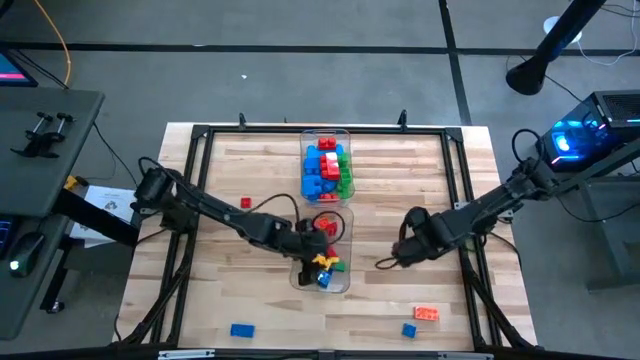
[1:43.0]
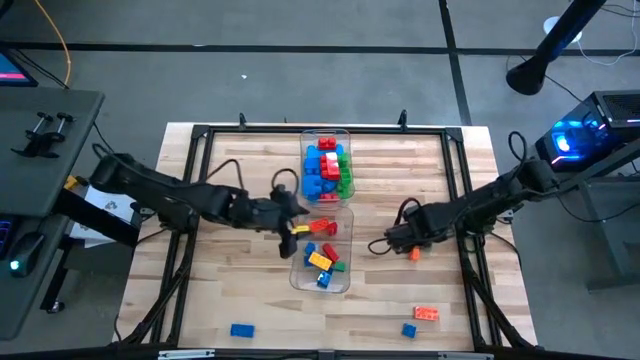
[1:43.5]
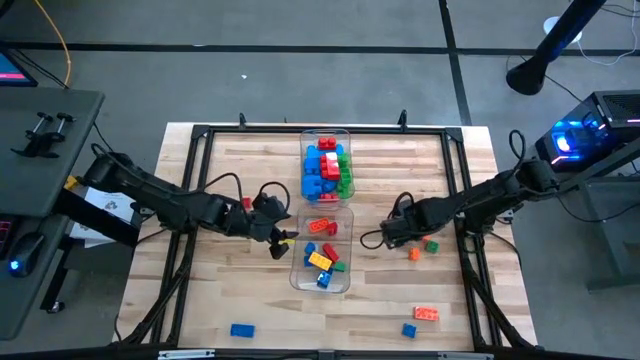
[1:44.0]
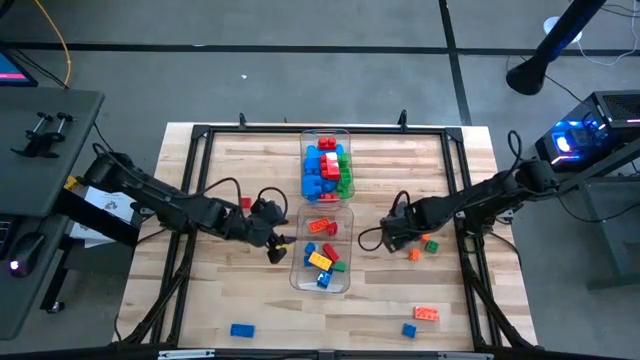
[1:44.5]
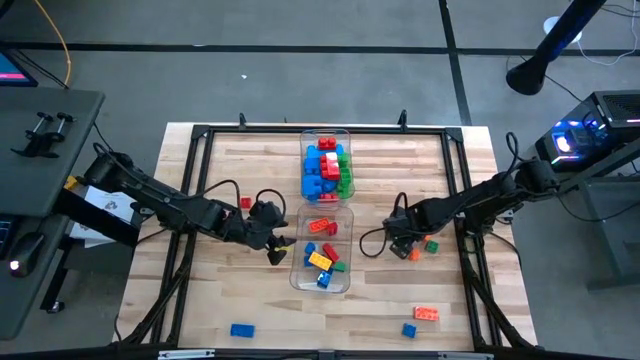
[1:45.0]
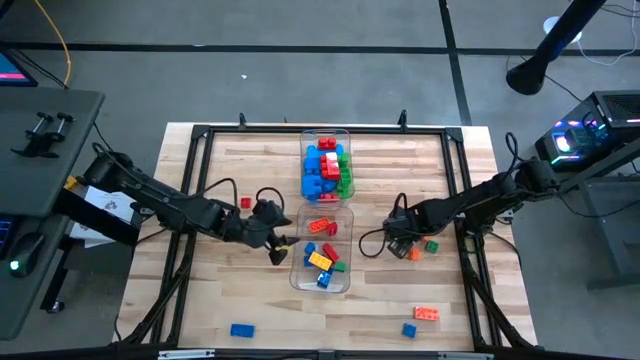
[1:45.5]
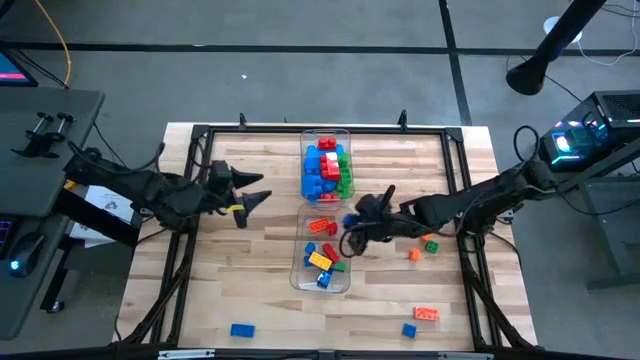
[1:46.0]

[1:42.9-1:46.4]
Task: Sort blocks by size
Put the small blue game piece into the bottom transparent bin

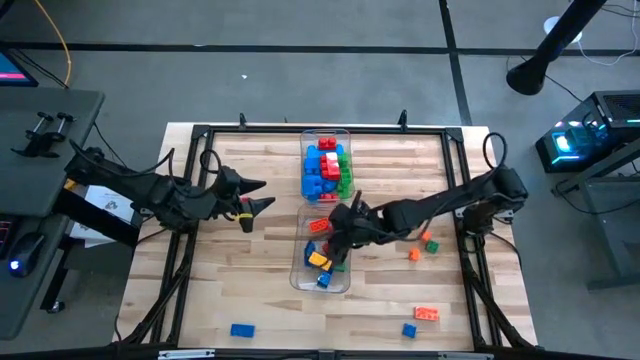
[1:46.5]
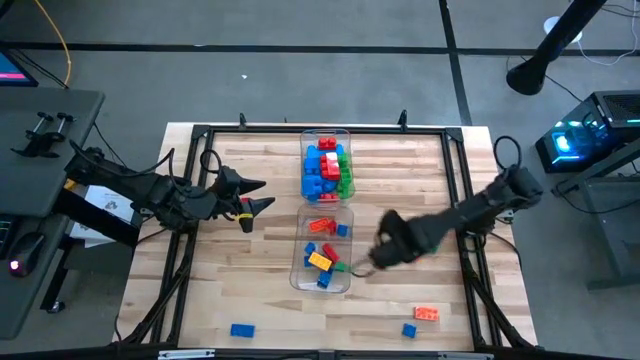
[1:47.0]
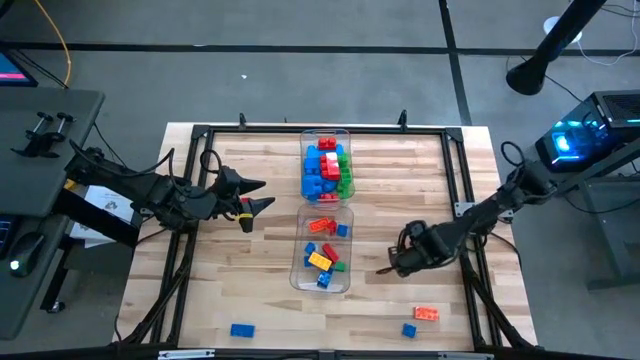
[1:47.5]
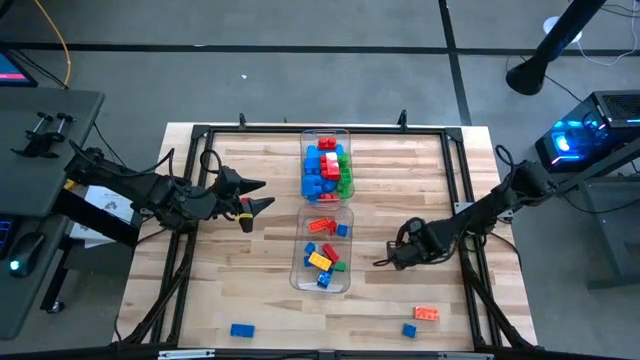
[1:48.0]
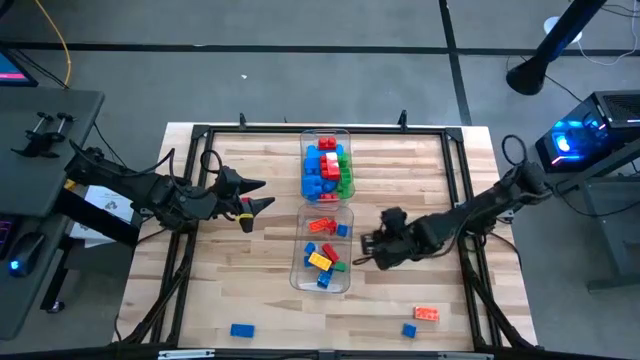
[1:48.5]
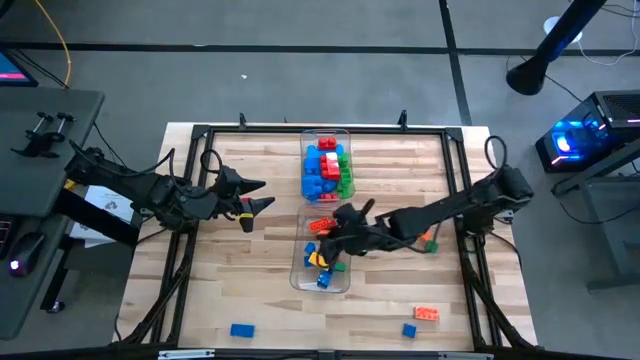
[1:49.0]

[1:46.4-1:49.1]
Put the small orange game piece into the bottom transparent bin

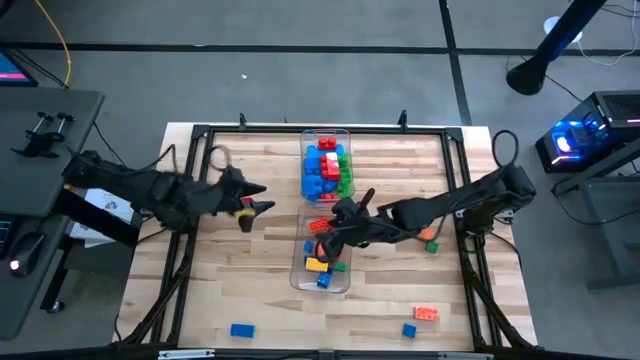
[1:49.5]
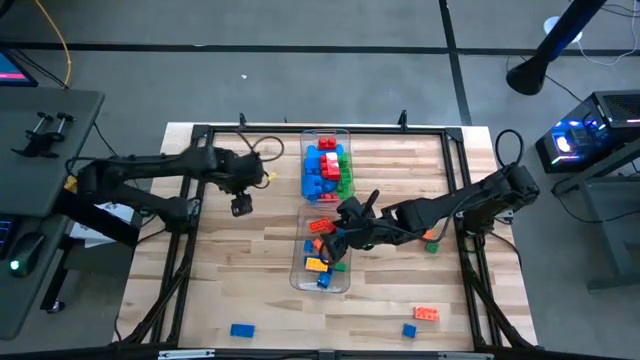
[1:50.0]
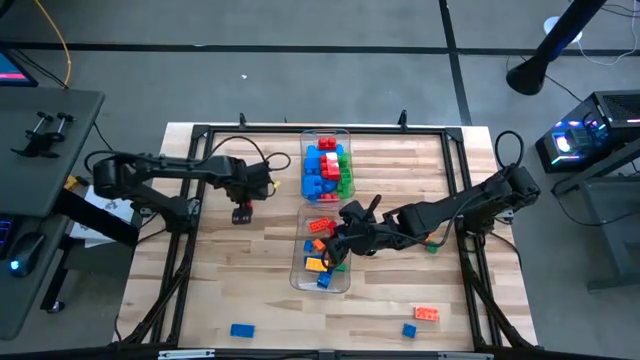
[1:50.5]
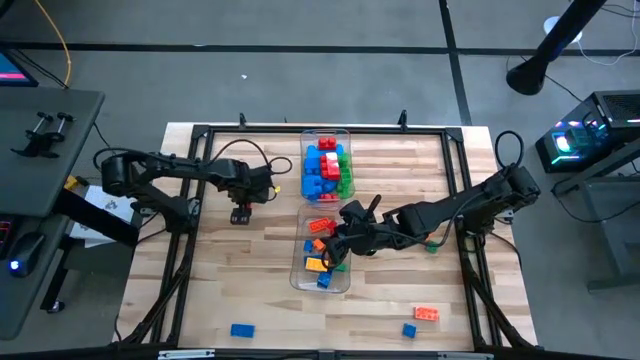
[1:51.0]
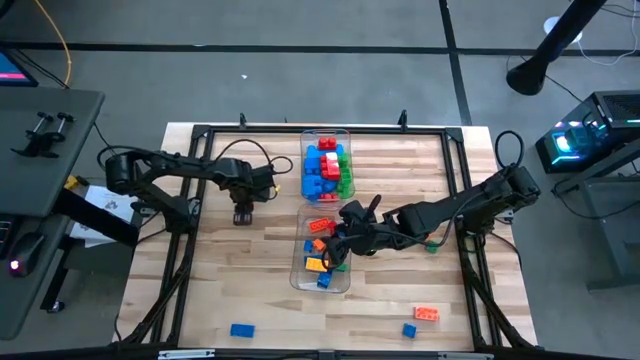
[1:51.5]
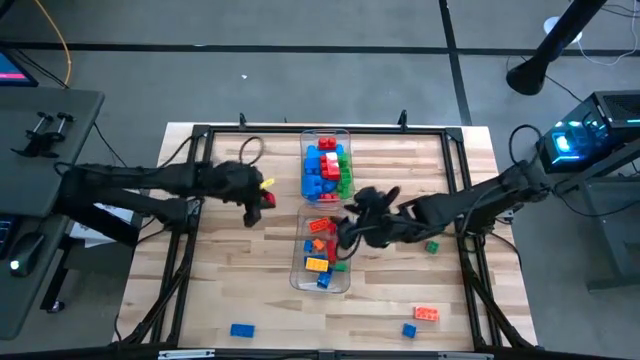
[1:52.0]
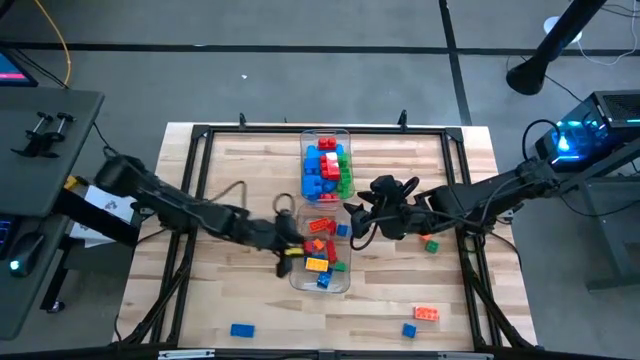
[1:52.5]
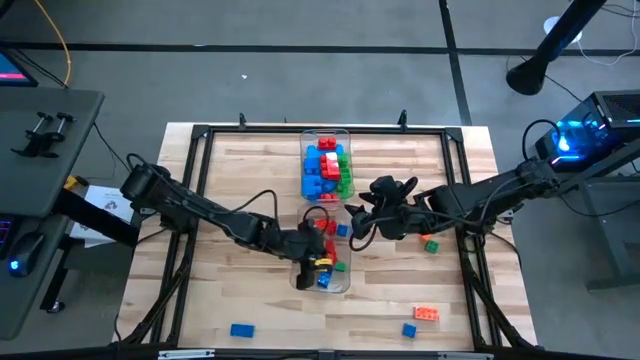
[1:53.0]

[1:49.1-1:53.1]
Put the small red game piece into the bottom transparent bin

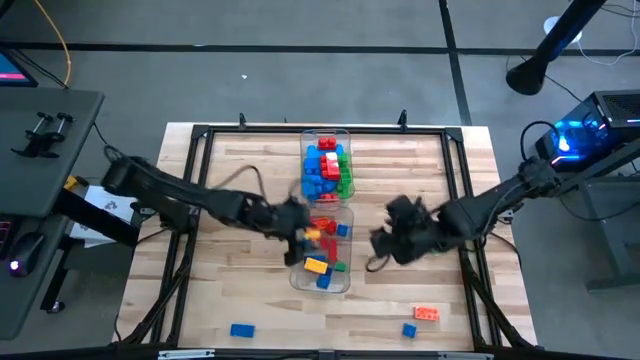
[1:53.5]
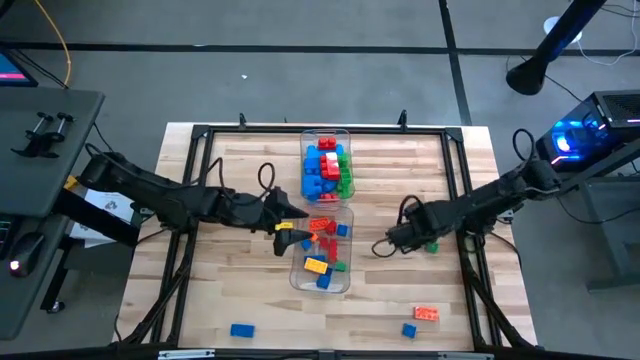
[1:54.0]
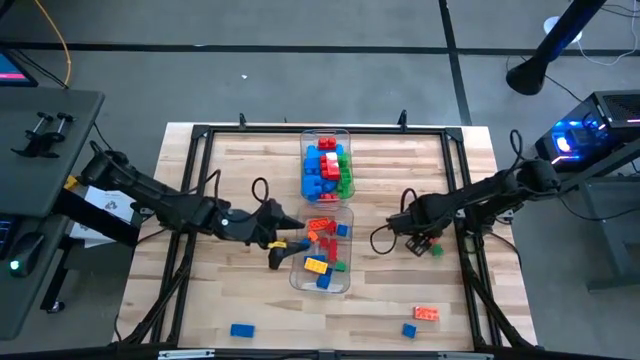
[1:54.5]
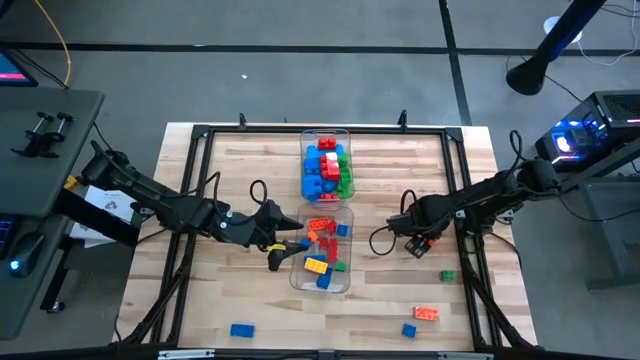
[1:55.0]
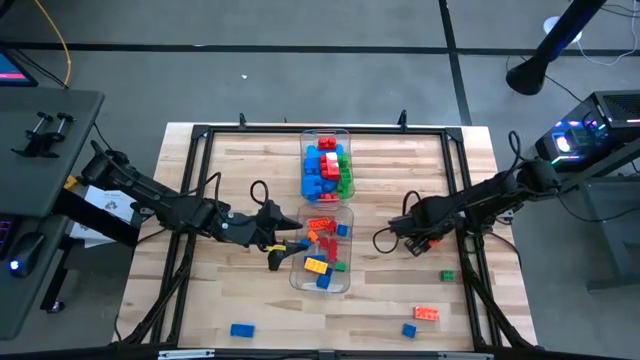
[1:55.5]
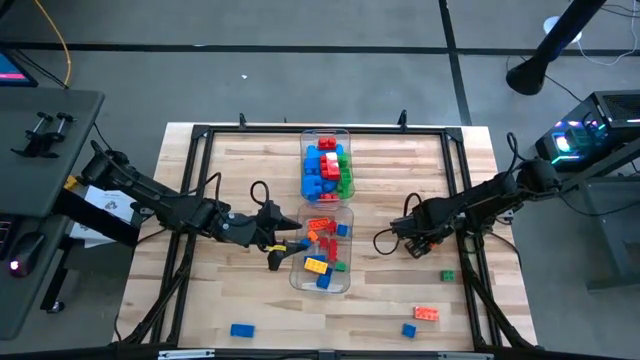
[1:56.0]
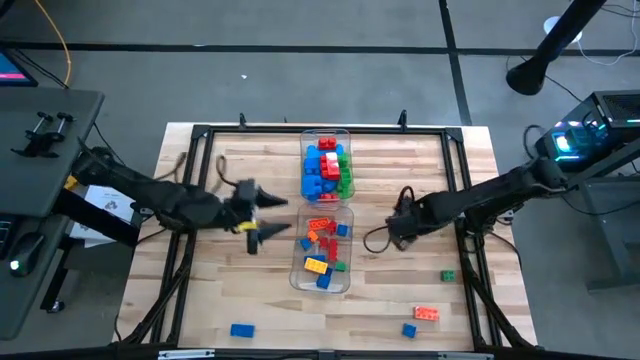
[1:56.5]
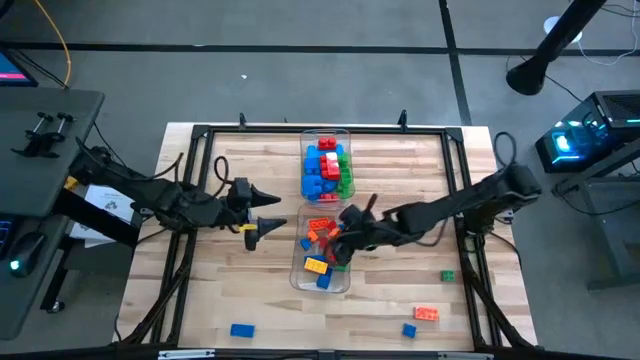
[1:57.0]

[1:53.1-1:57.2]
Put the small orange game piece into the bottom transparent bin

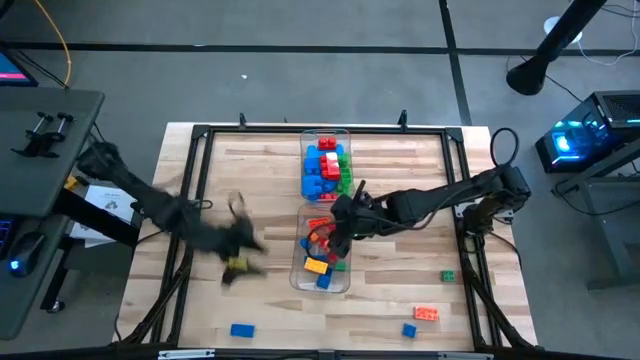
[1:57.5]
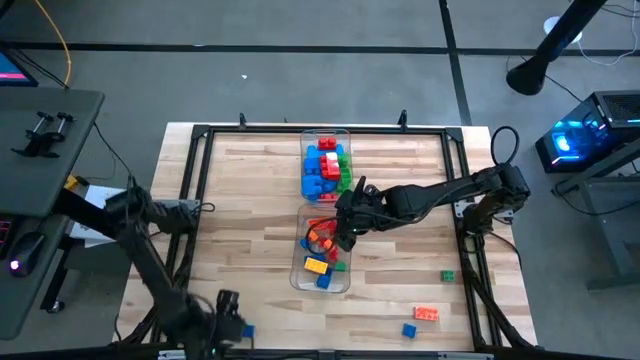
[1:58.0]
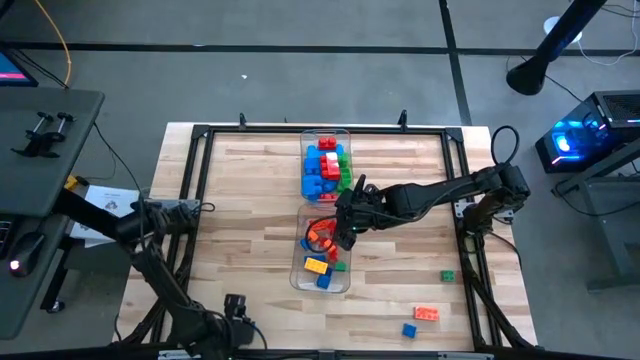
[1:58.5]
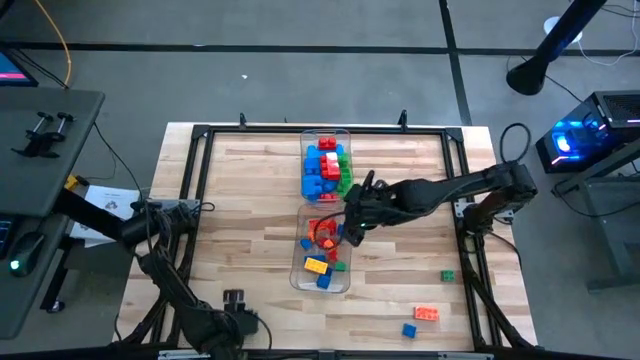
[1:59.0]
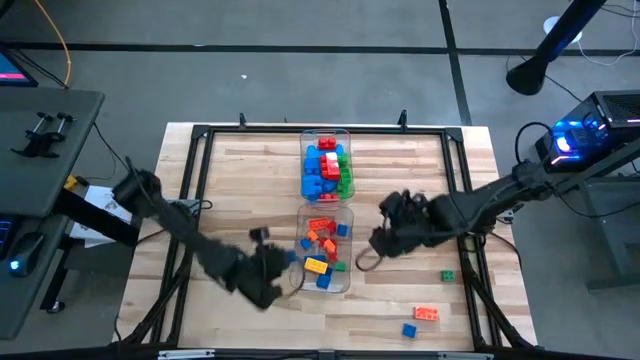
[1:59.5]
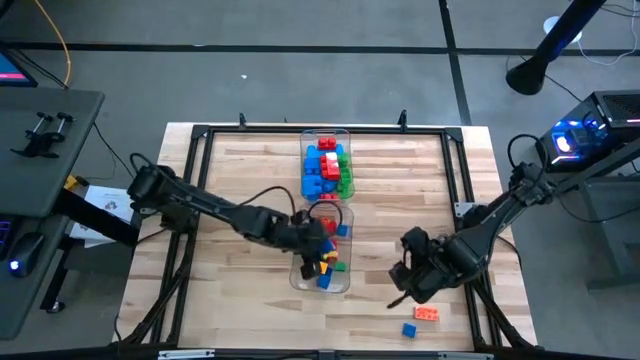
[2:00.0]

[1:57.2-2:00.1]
Put the small blue game piece into the bottom transparent bin

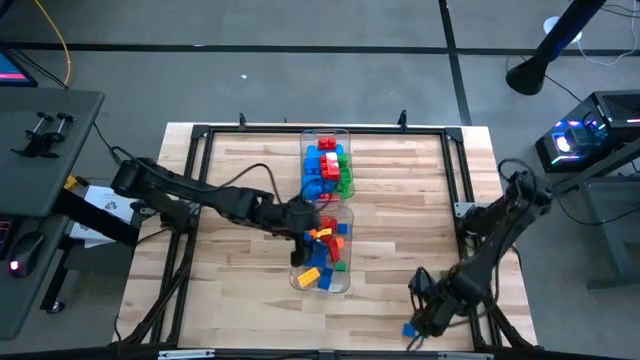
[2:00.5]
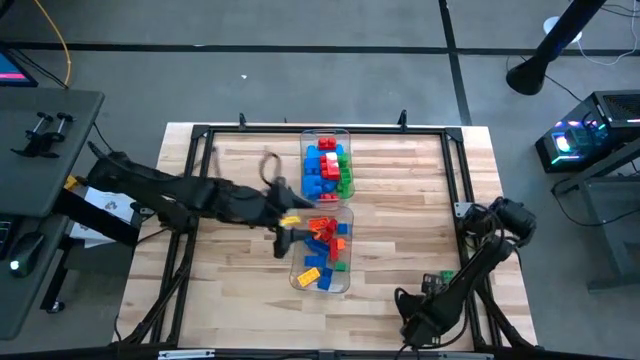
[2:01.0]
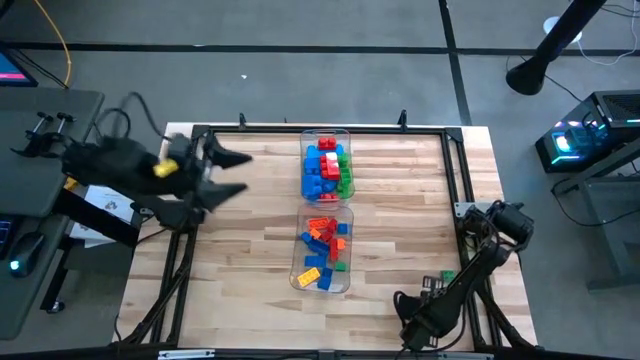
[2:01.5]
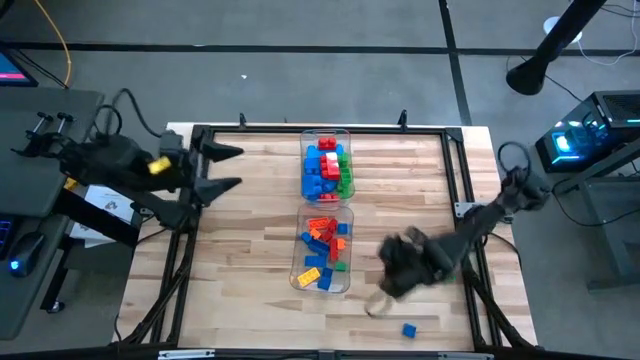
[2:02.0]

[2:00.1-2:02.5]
Put the small orange game piece into the bottom transparent bin

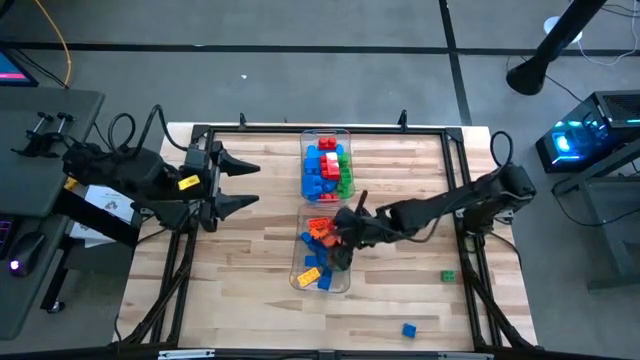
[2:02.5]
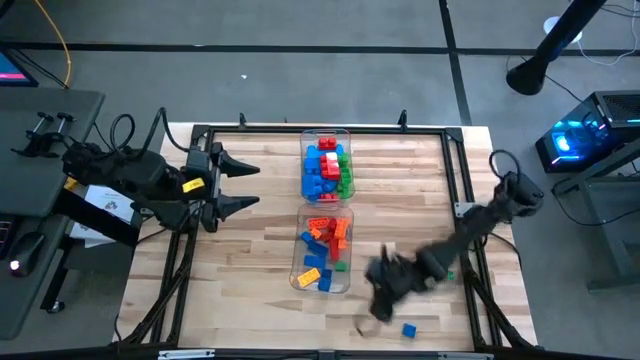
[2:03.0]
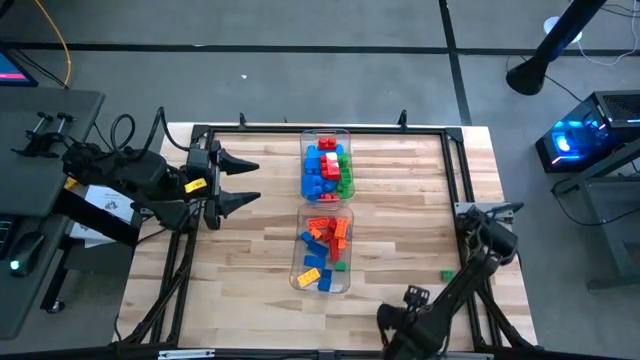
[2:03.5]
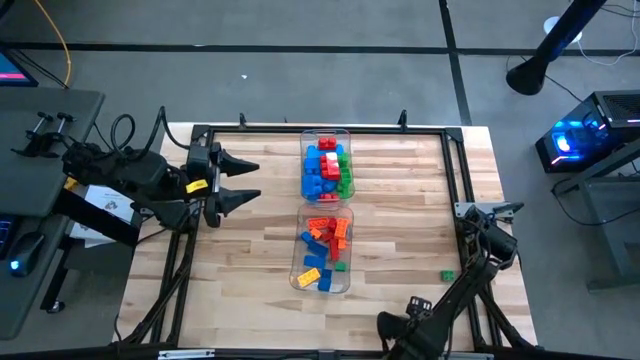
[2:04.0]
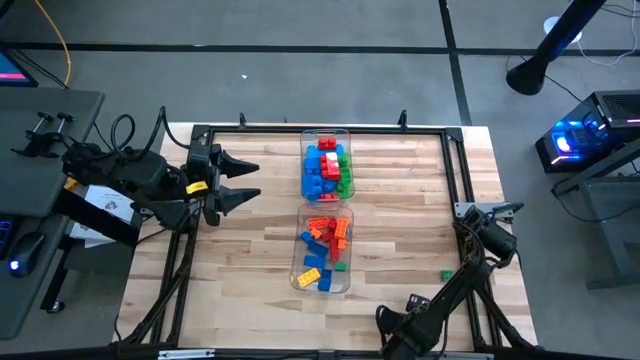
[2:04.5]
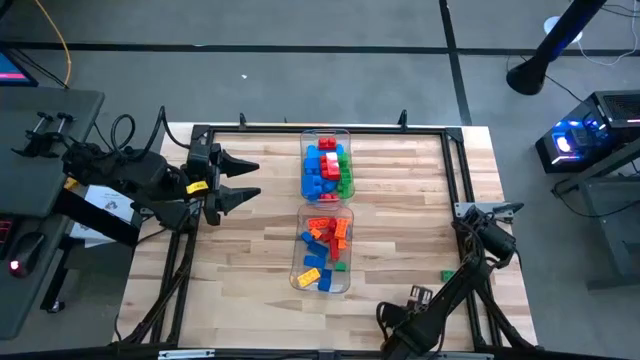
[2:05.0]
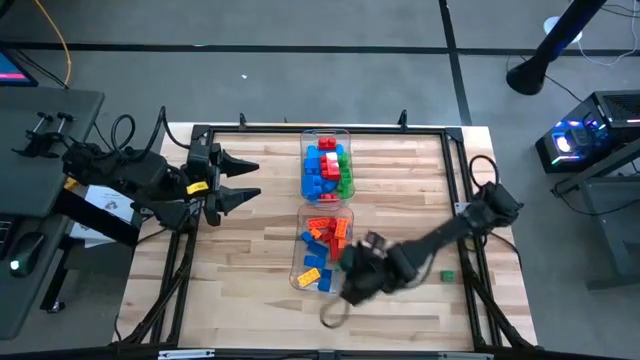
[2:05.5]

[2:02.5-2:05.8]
Put the small blue game piece into the bottom transparent bin
